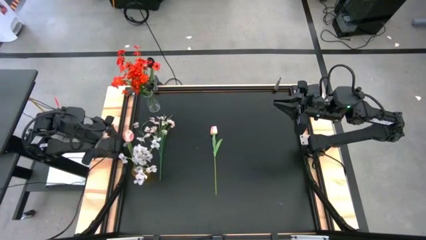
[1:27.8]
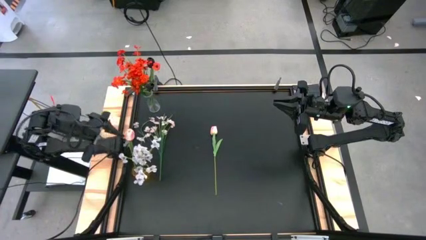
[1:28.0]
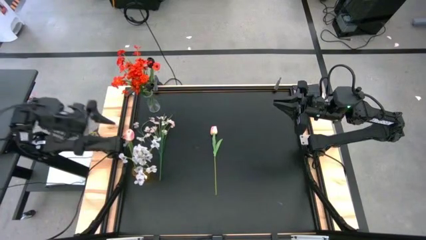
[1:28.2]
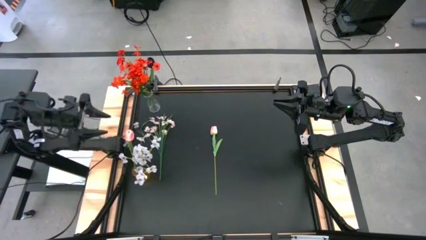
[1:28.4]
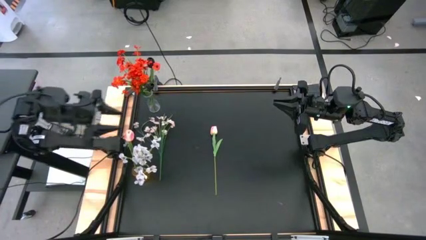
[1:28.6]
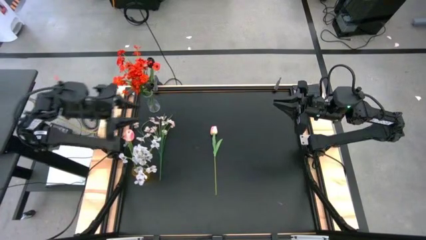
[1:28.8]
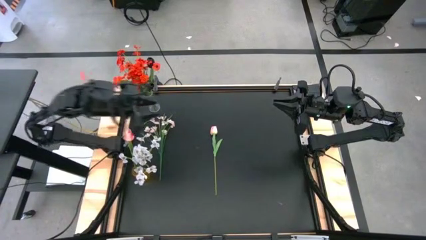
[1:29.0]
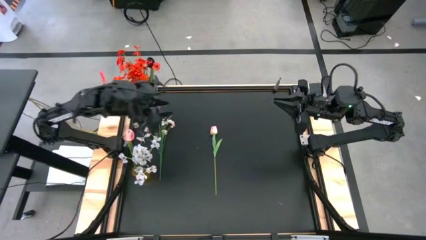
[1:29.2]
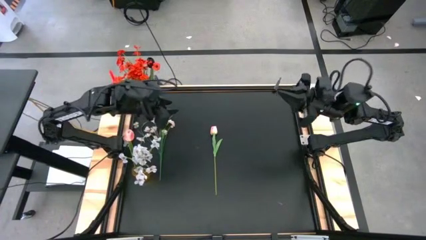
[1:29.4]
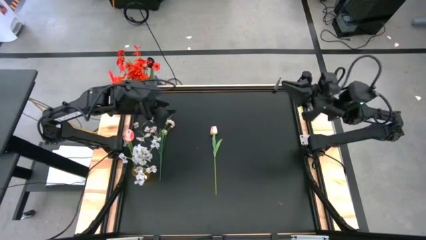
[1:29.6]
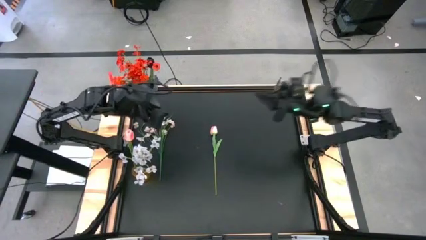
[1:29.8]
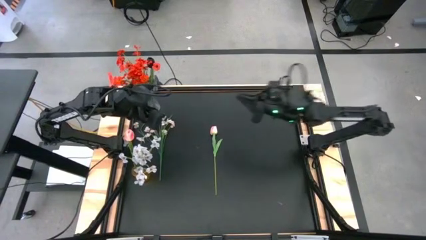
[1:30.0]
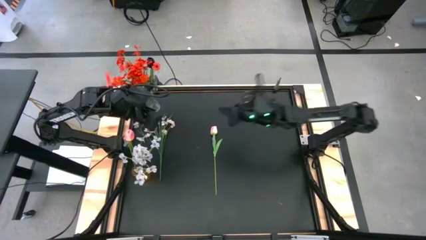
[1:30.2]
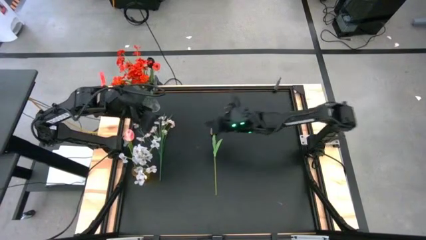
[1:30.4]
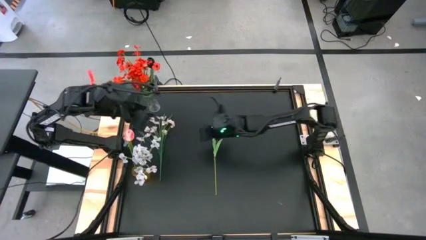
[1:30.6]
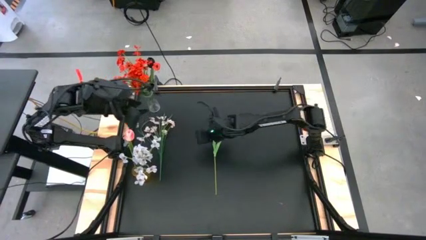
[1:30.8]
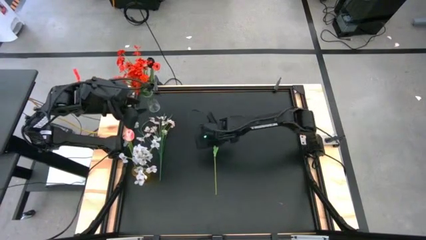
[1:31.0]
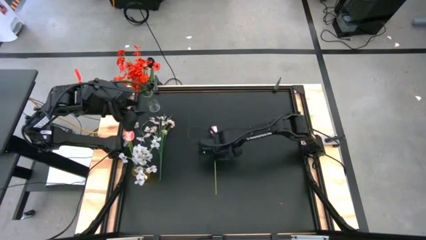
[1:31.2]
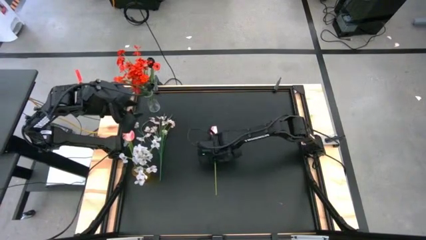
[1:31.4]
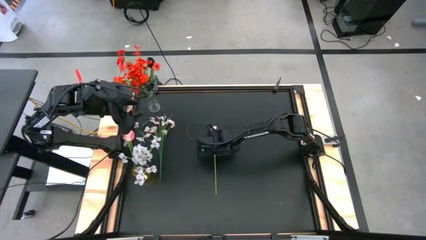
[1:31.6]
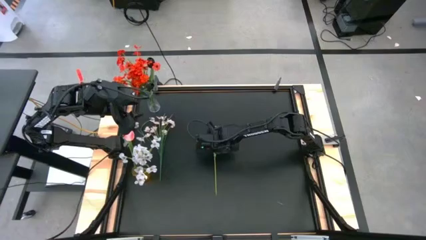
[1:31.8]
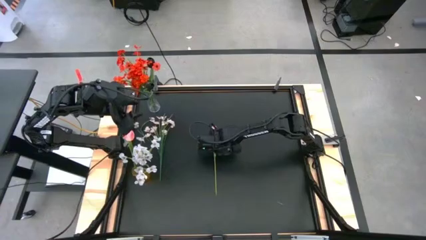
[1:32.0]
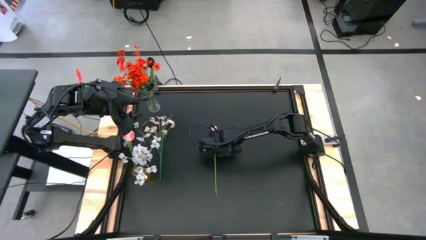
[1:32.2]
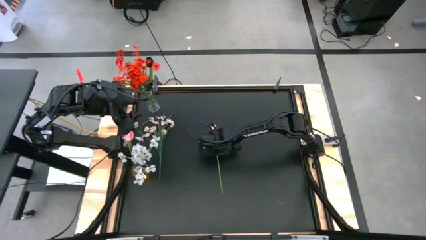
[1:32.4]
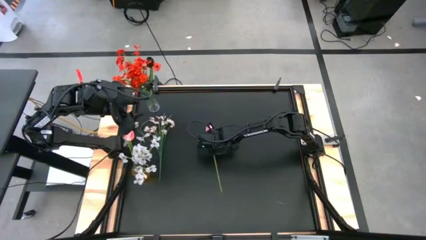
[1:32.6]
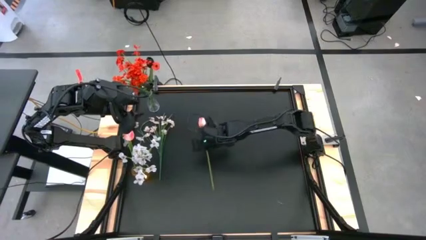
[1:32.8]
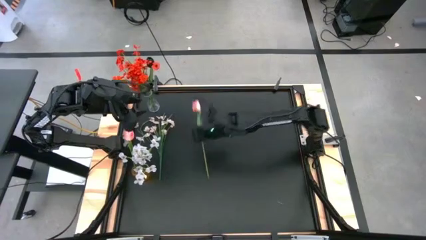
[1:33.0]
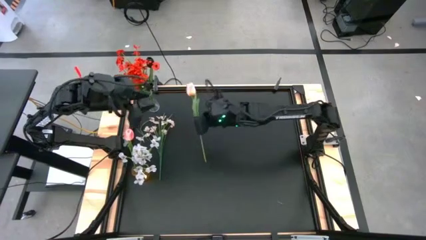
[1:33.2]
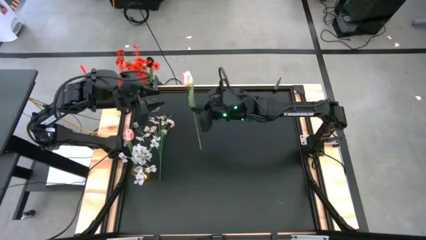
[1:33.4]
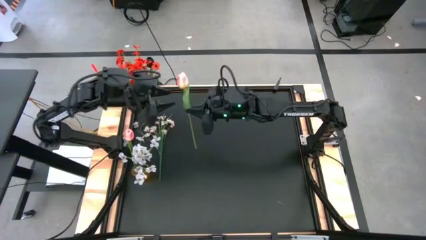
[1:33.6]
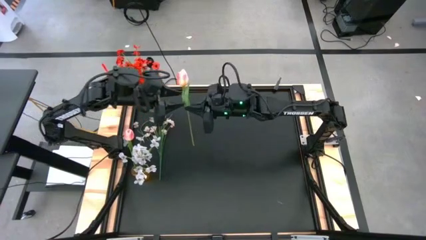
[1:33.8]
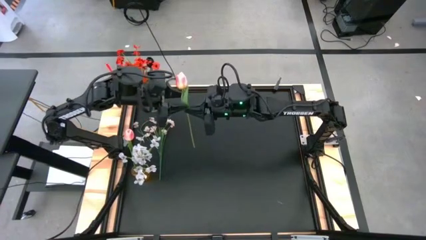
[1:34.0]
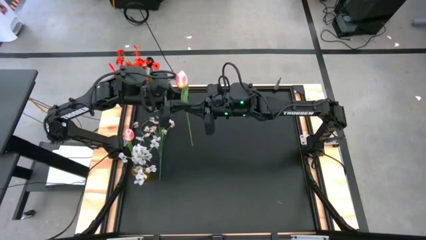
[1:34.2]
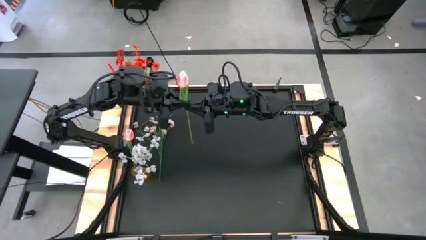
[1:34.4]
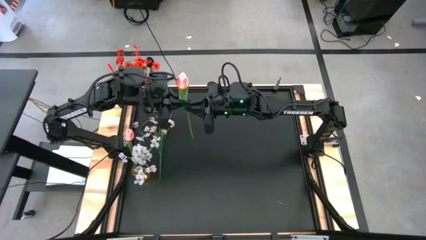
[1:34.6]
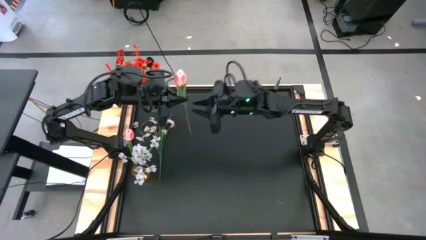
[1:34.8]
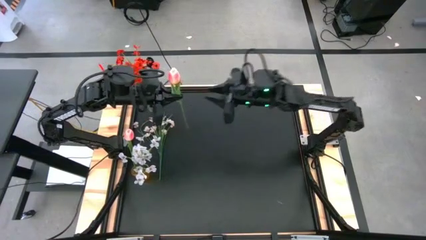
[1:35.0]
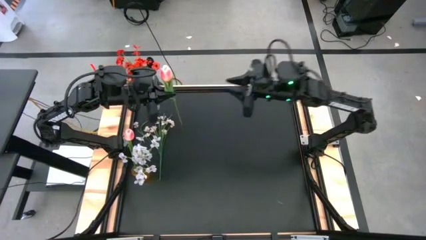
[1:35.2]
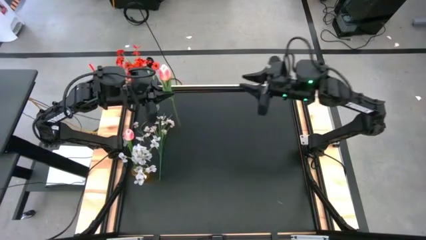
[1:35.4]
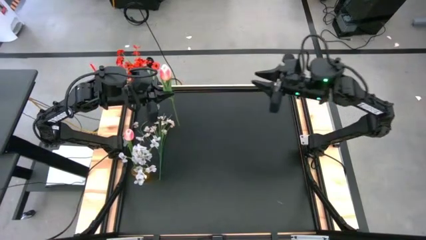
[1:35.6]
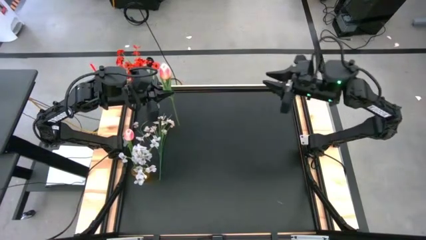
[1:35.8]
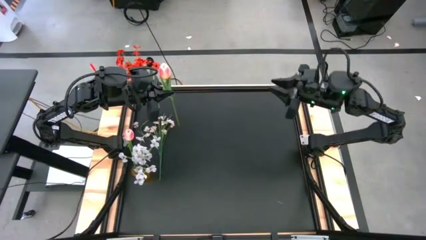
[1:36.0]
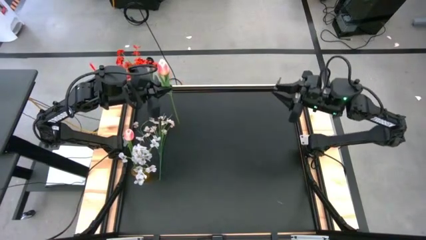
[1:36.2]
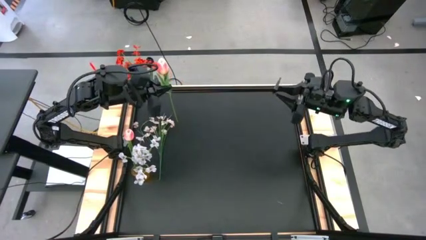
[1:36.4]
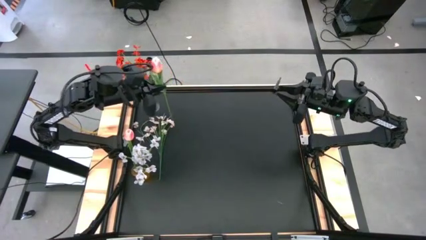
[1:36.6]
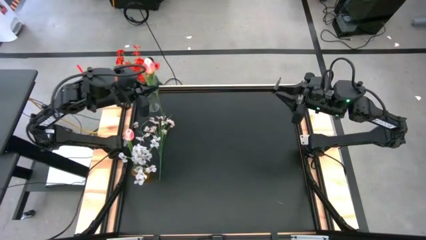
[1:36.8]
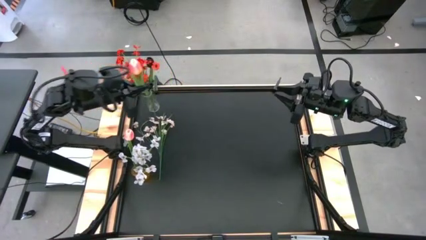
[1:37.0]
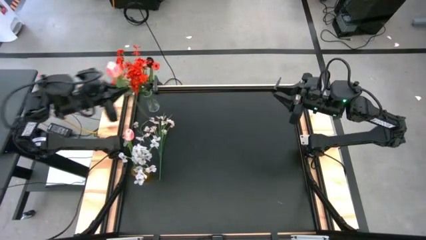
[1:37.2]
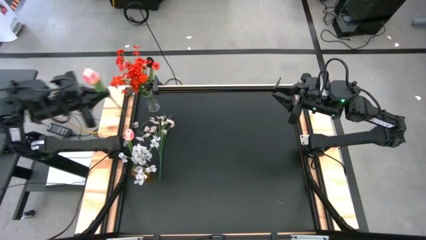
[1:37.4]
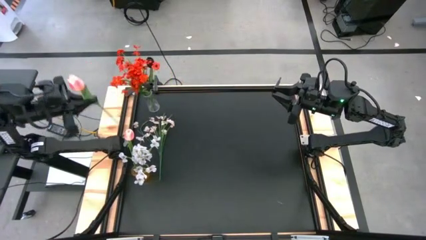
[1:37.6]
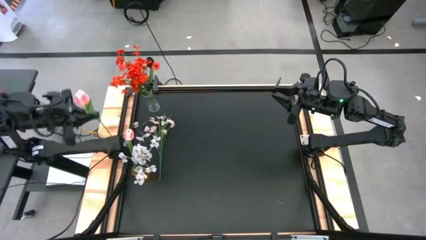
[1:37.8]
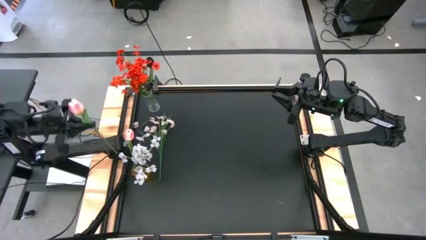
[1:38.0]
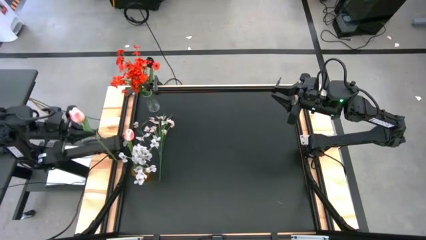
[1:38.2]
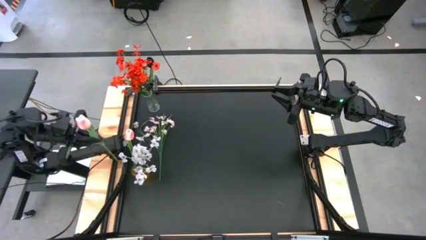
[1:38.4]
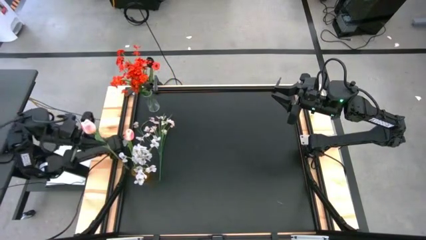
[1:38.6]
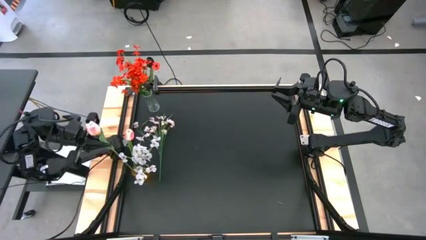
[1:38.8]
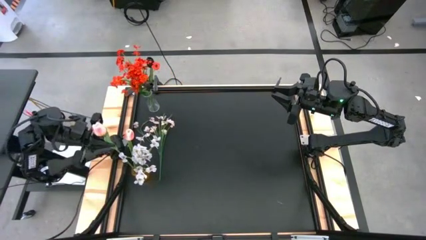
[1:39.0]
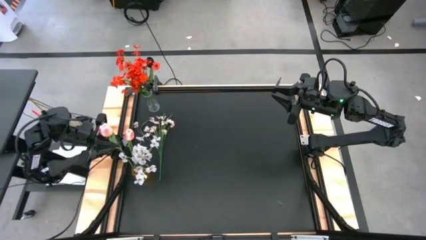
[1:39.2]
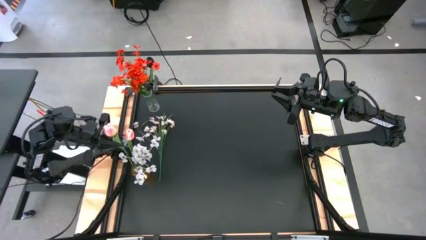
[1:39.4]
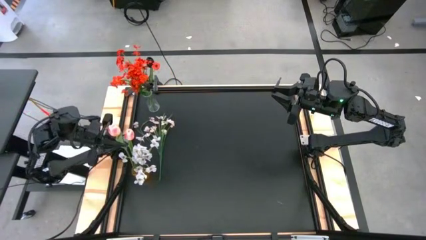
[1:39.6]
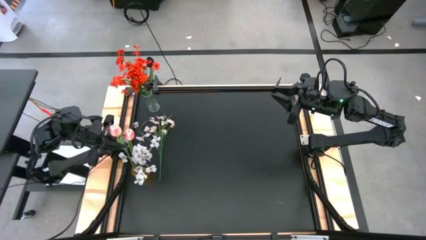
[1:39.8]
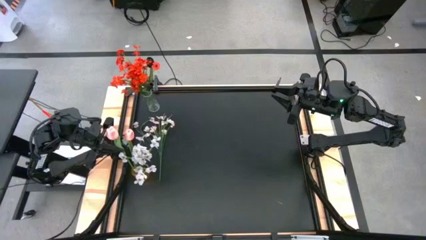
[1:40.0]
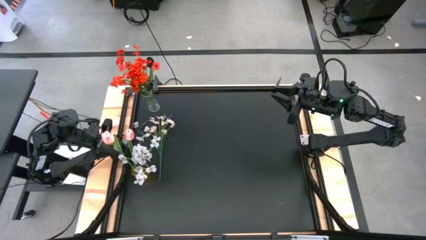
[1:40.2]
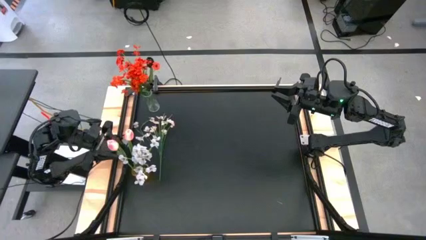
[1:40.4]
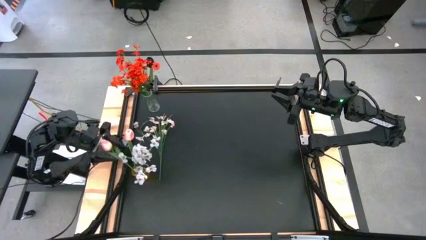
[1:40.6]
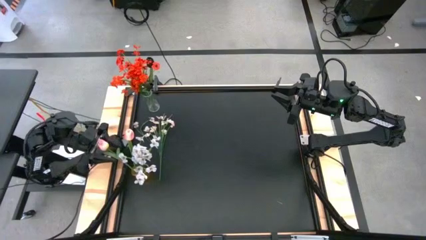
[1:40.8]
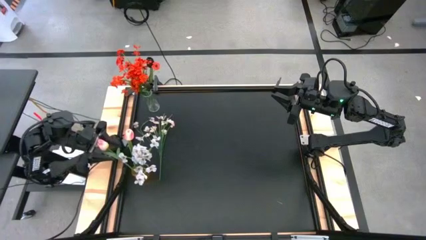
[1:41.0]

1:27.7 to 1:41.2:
Task: Sort flowers into vase by color
Put the pink flower into the yellow vase

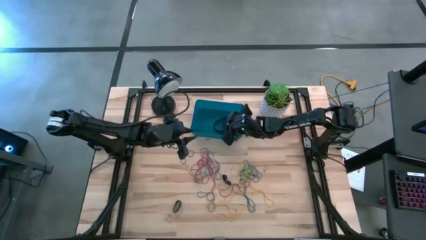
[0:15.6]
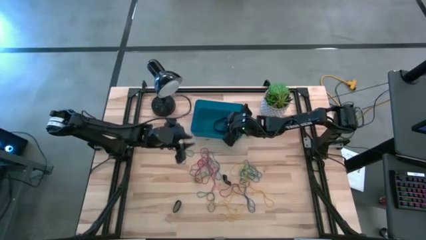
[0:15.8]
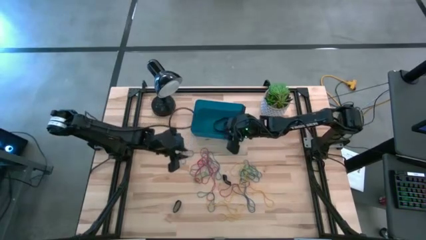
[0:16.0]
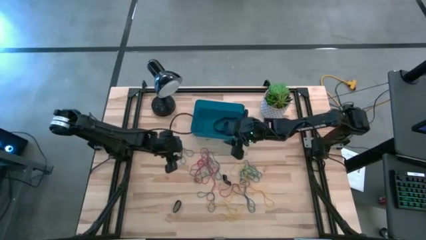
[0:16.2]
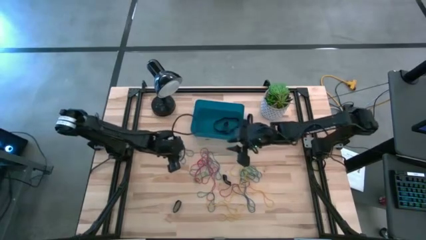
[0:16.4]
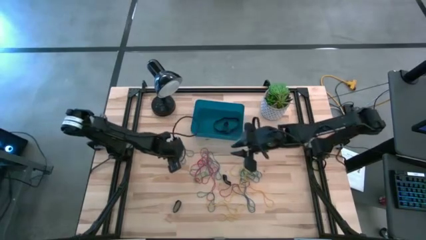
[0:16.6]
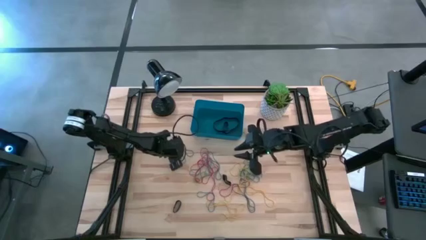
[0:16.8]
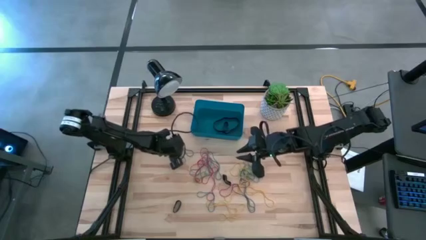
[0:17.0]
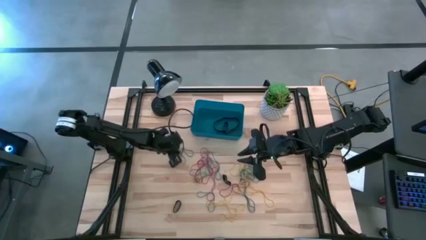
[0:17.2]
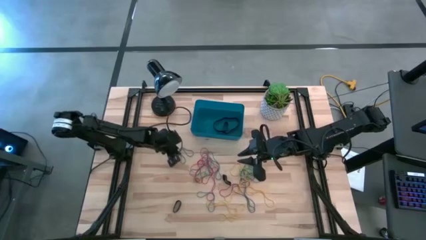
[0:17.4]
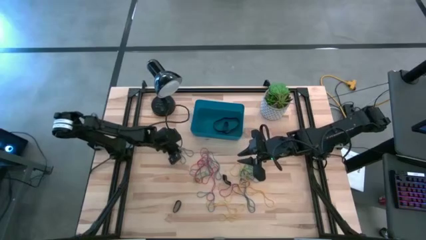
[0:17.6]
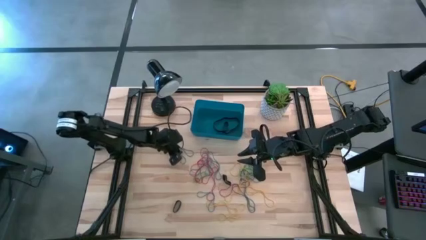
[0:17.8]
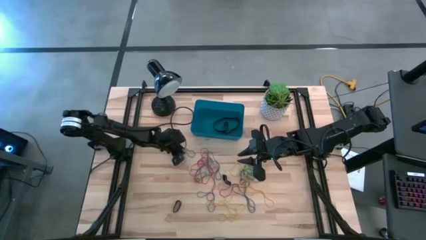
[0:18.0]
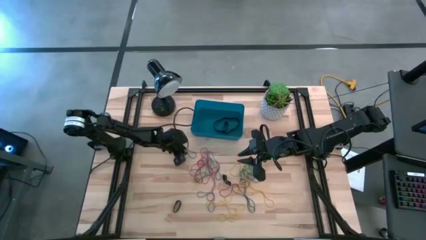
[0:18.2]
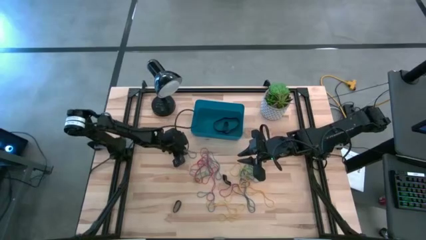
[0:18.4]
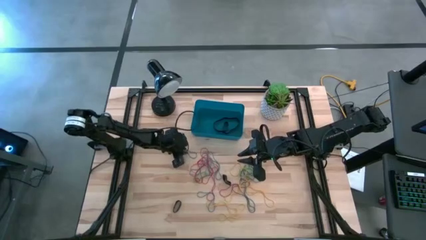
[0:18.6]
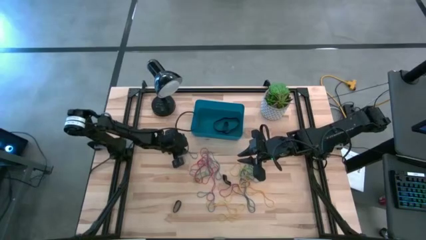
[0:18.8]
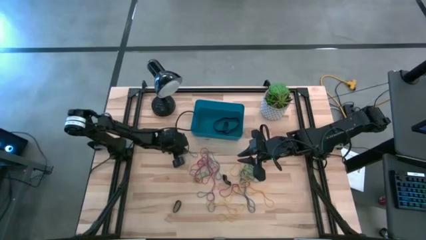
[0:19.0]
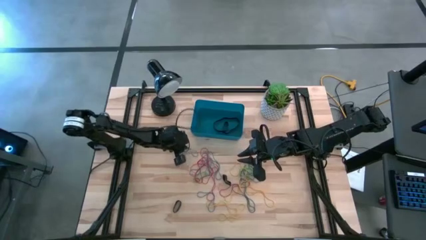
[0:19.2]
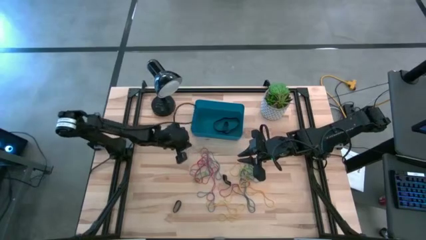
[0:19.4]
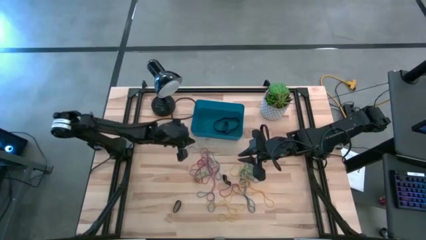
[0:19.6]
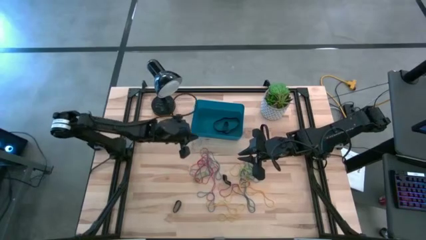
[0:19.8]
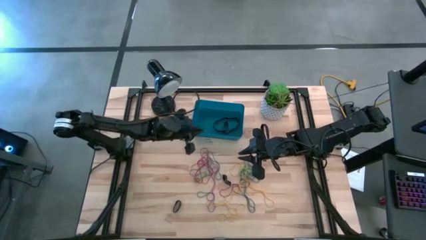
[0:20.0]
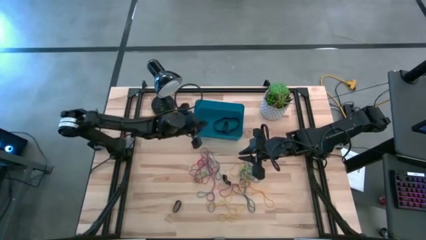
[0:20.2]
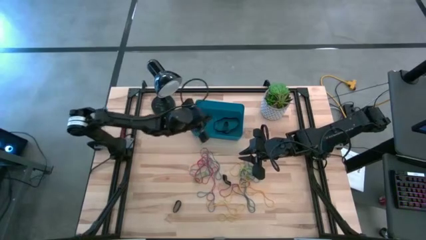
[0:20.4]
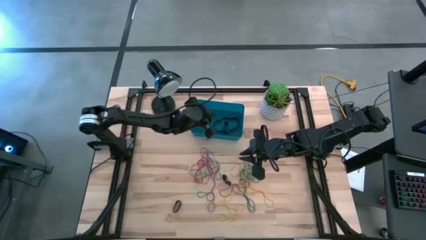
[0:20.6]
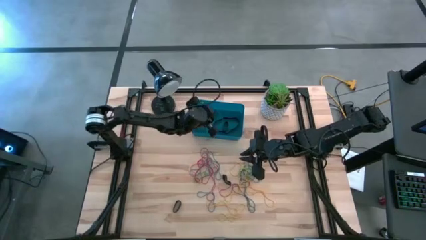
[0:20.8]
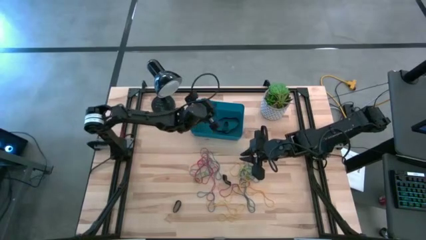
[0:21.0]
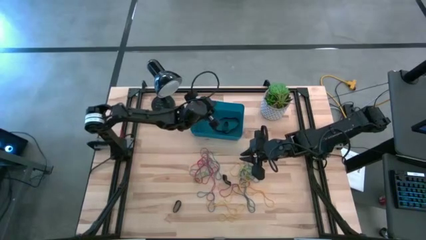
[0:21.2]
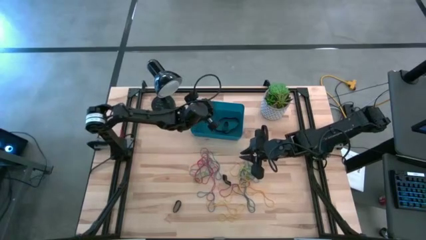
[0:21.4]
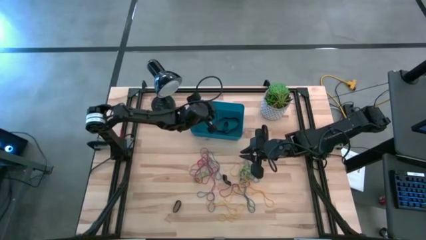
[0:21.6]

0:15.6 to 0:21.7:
Task: Pick and place rubber bands into bin
Put the blue rubber band into the blue bin
